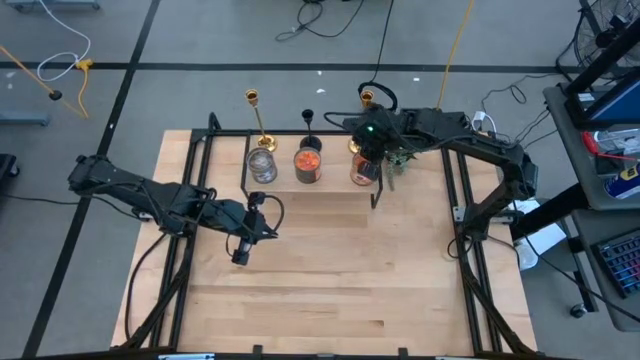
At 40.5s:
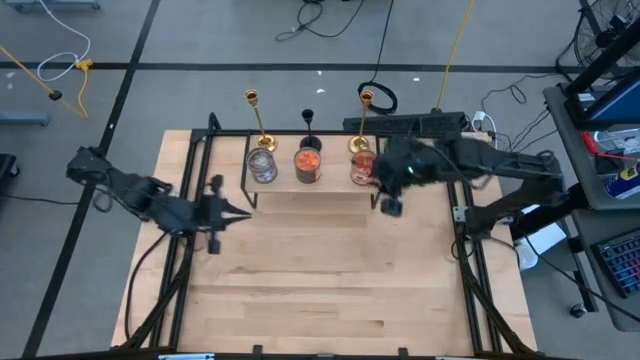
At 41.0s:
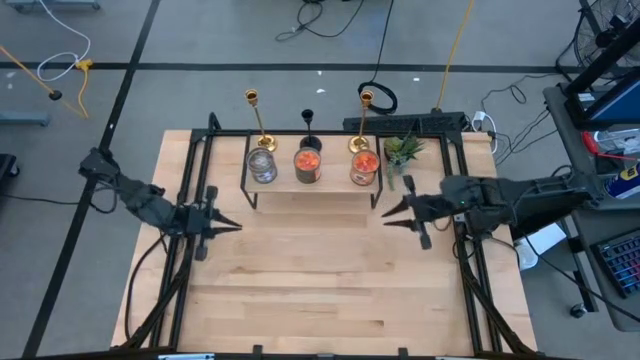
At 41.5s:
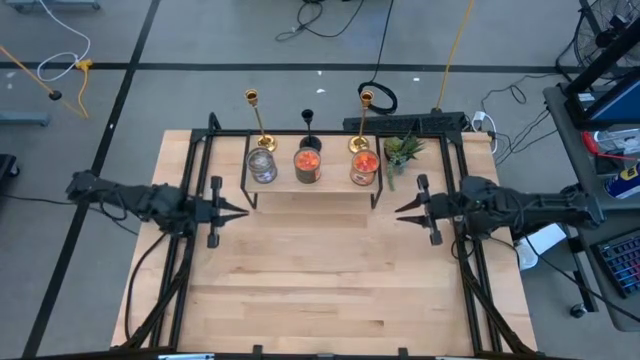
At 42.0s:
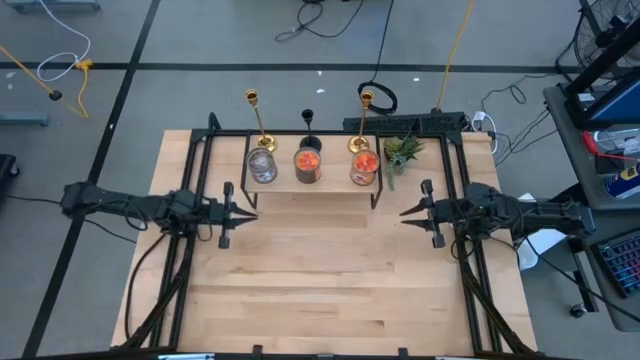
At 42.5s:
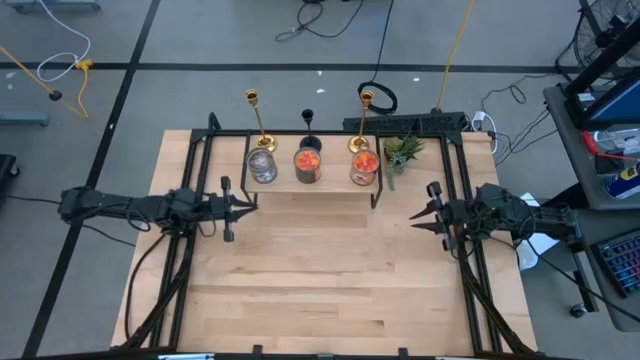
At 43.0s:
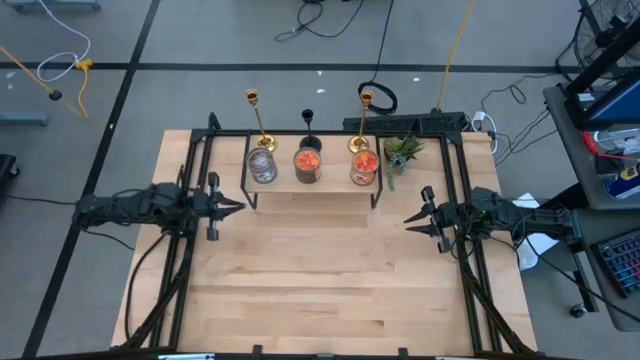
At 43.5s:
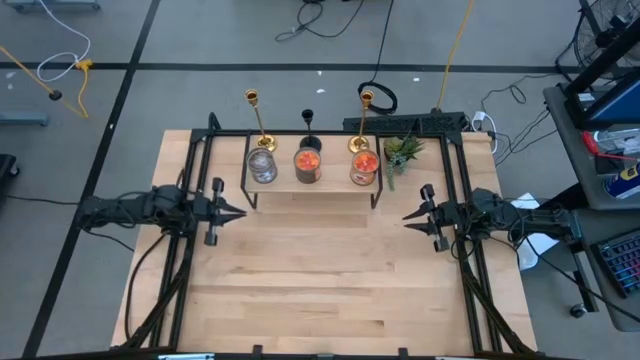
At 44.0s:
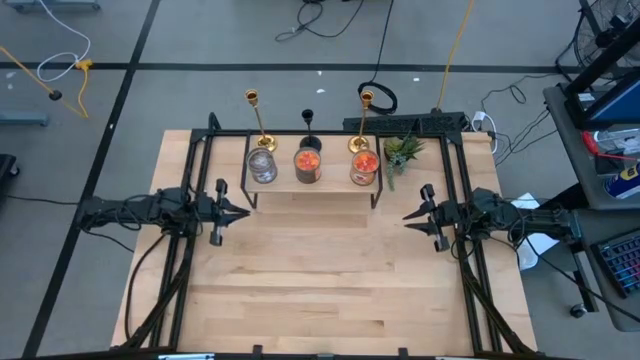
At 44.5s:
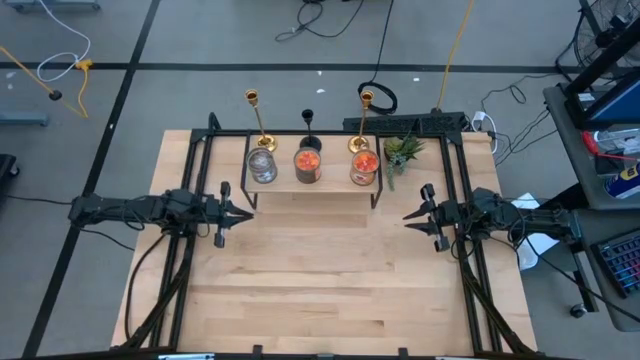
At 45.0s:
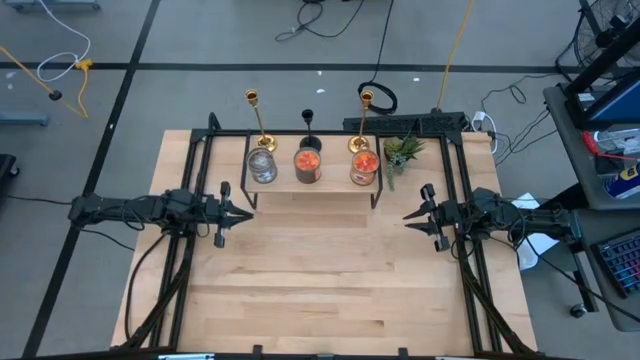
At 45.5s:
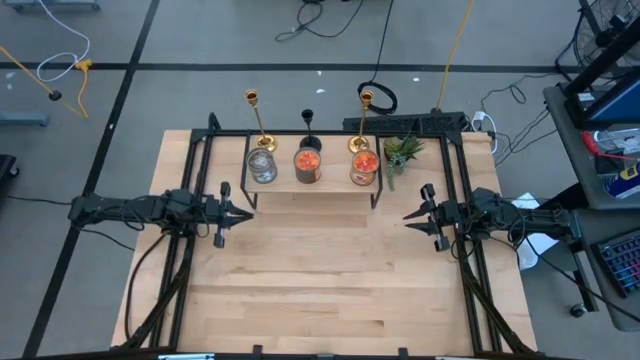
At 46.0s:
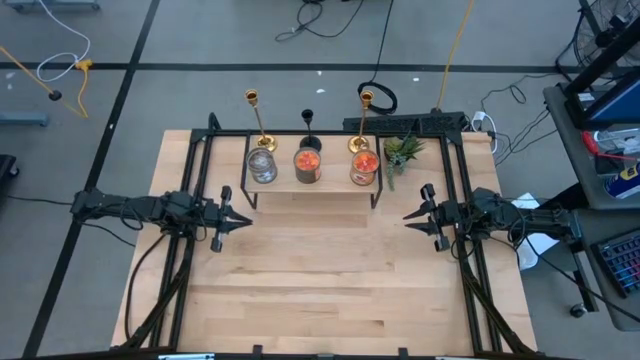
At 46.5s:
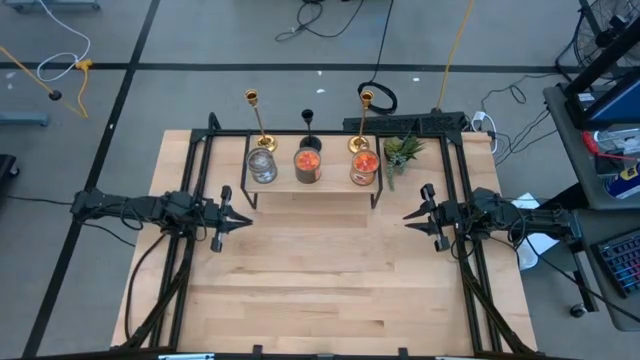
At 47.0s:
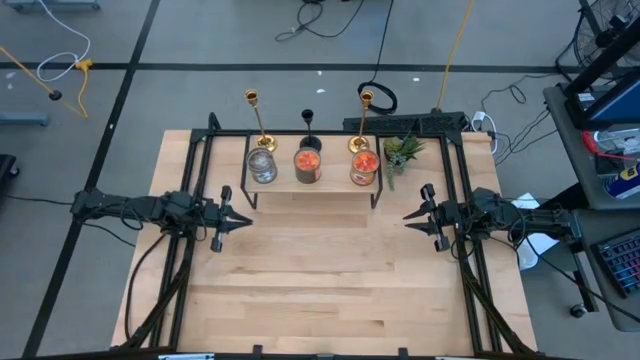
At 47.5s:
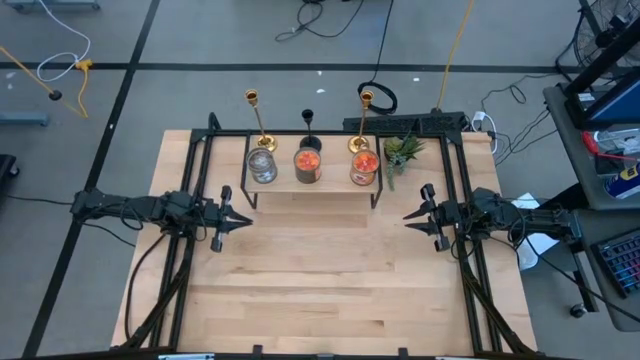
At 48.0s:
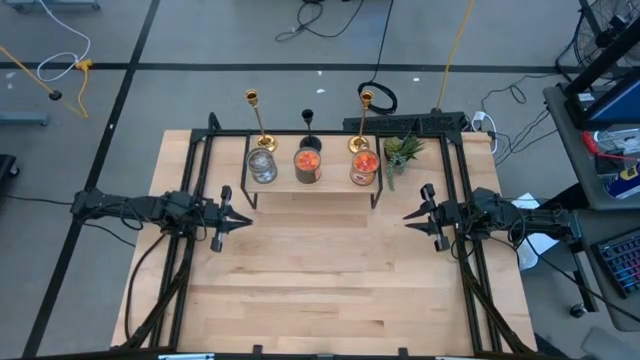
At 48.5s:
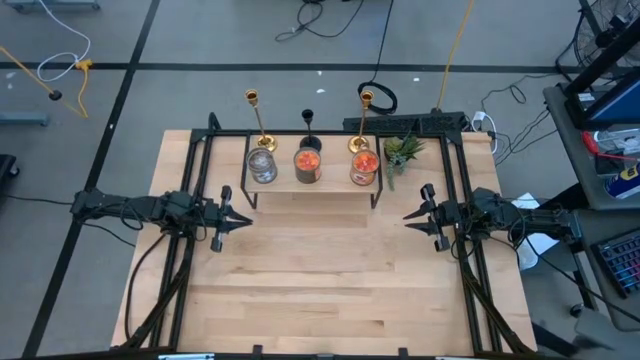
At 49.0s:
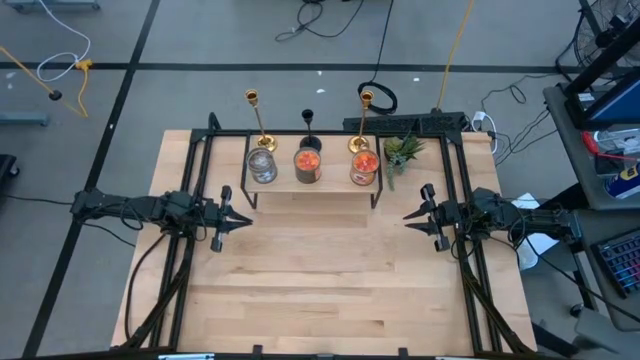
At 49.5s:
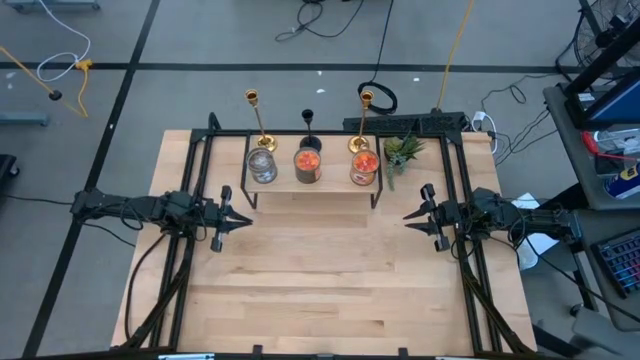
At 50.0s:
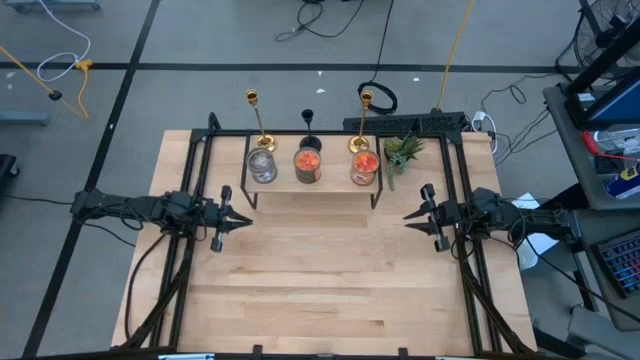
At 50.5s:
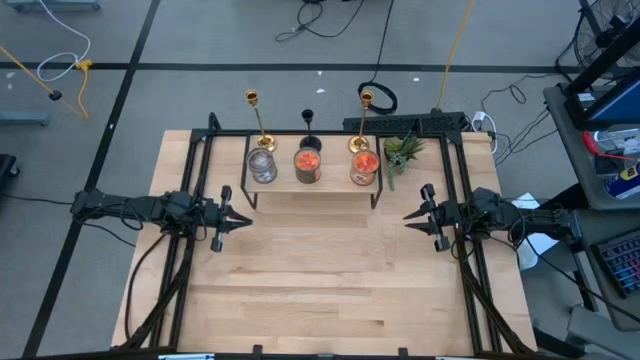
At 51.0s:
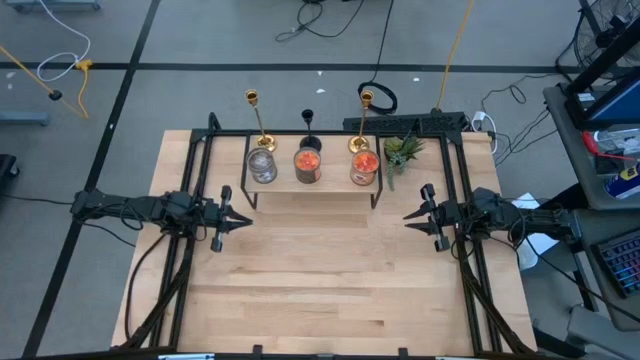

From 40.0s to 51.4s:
Task: Pick & Place candle stick holders
Return to Home Position

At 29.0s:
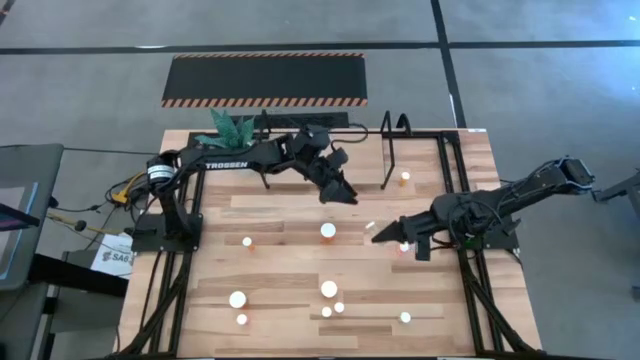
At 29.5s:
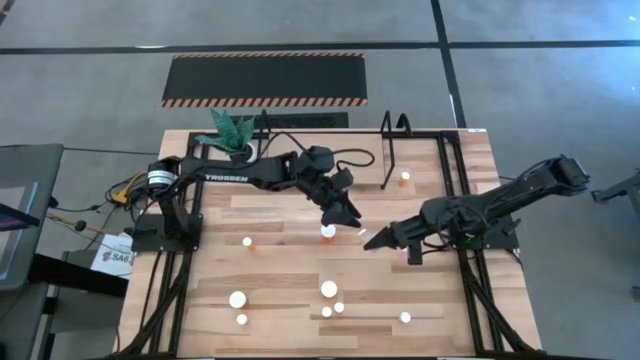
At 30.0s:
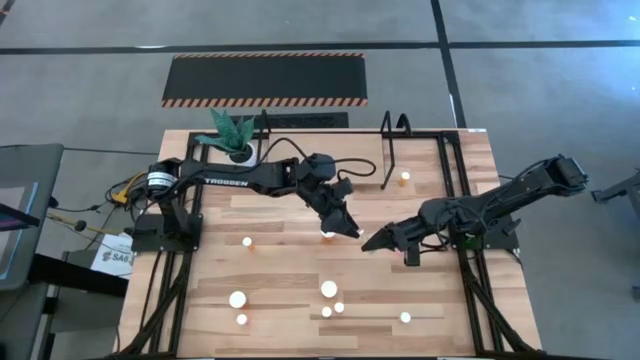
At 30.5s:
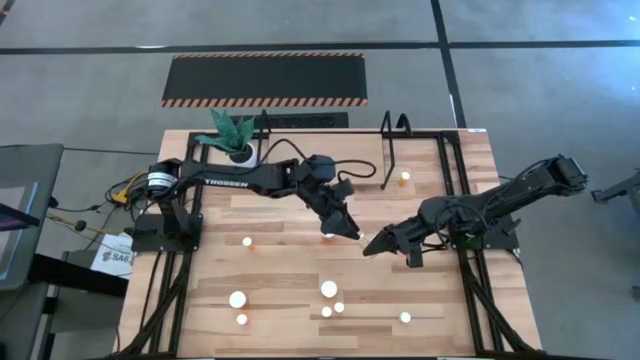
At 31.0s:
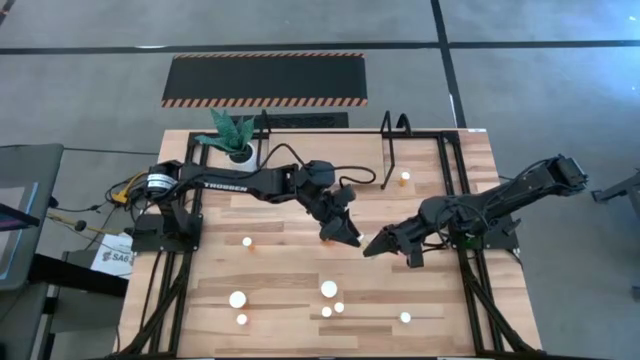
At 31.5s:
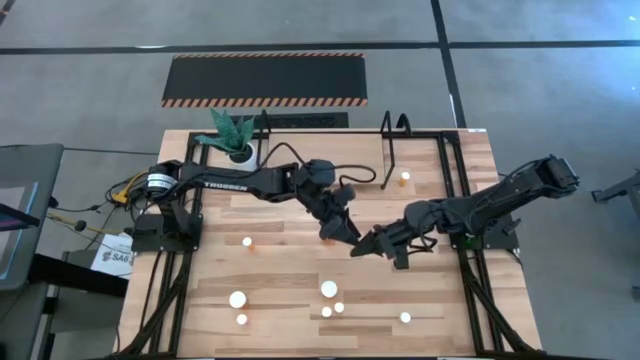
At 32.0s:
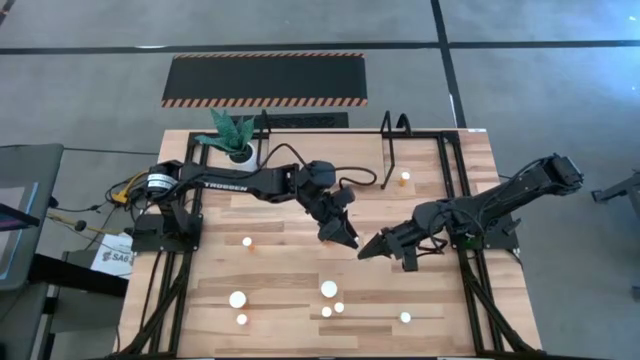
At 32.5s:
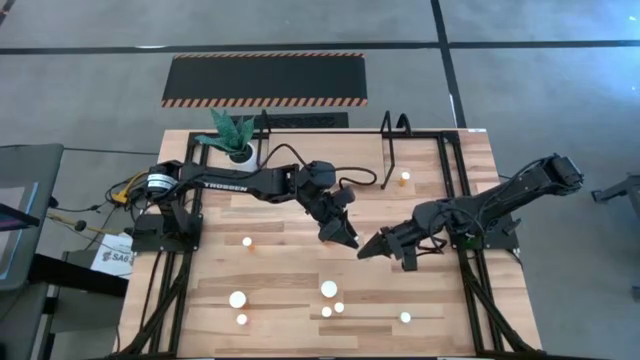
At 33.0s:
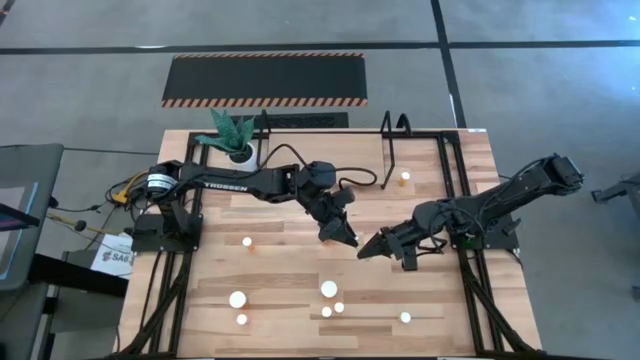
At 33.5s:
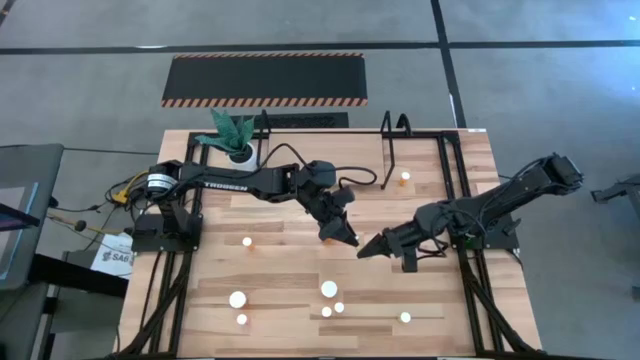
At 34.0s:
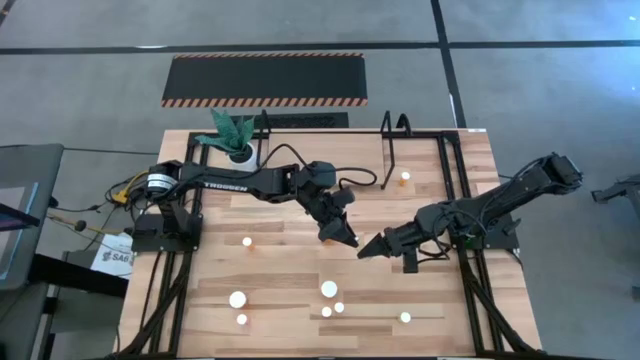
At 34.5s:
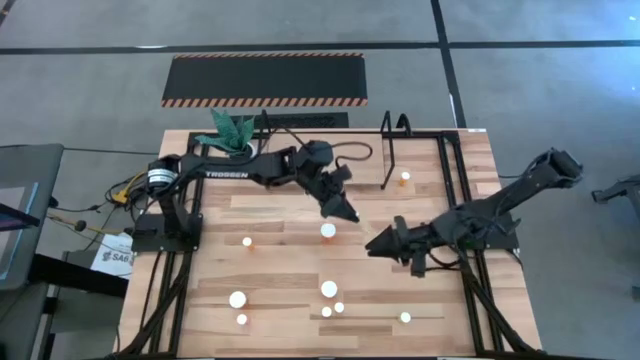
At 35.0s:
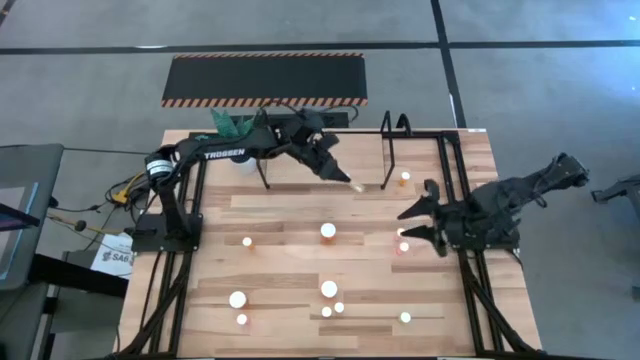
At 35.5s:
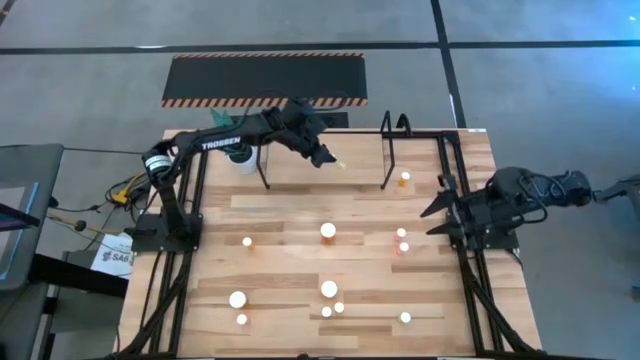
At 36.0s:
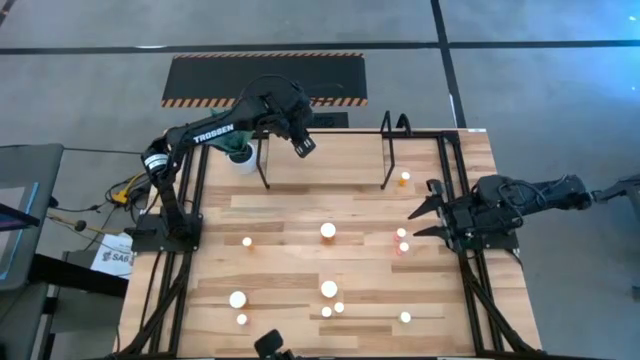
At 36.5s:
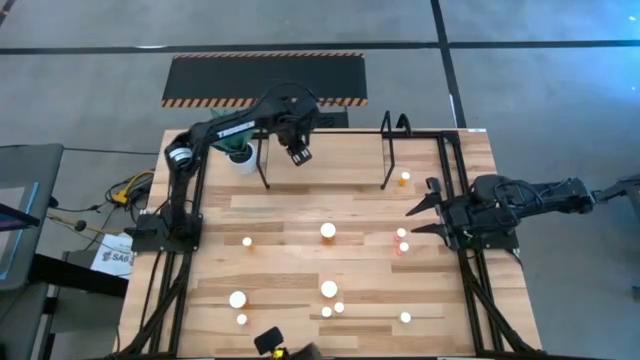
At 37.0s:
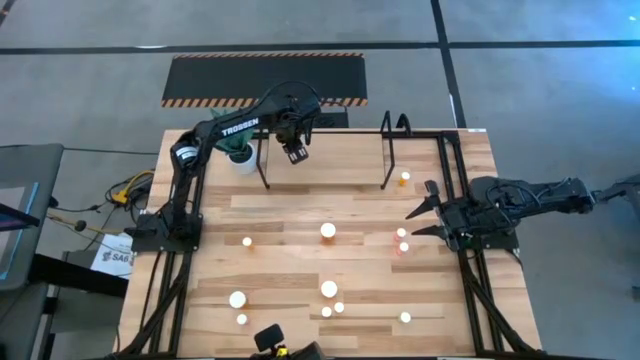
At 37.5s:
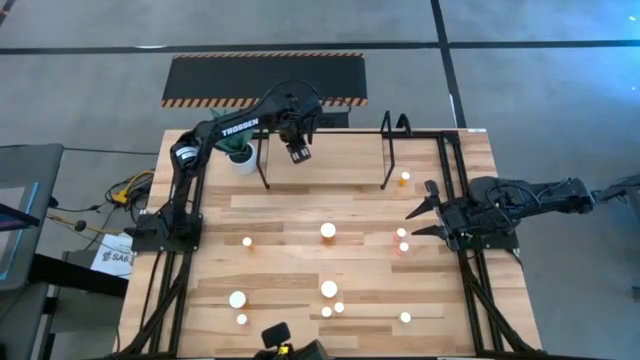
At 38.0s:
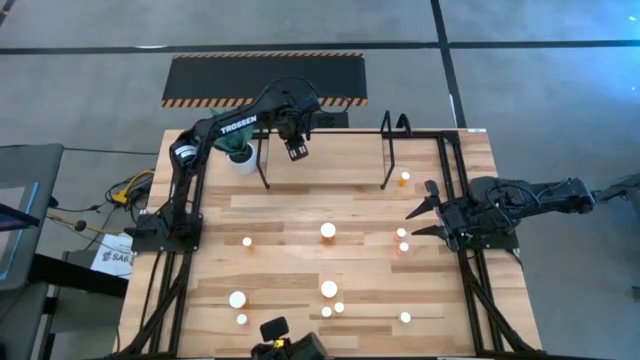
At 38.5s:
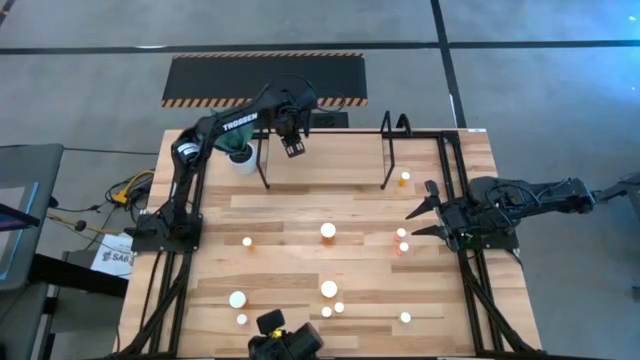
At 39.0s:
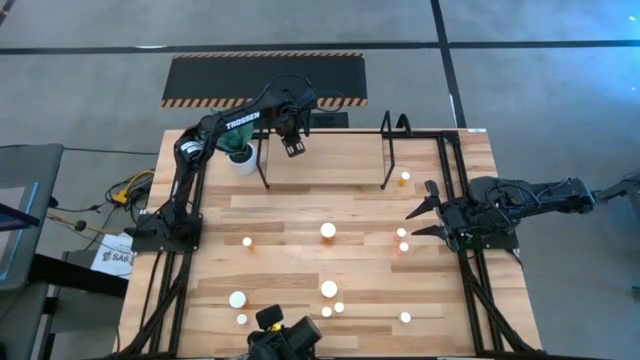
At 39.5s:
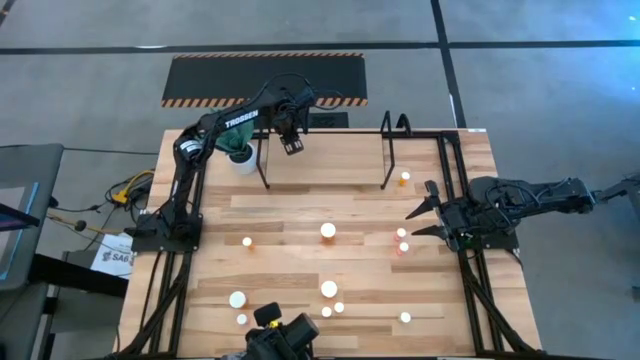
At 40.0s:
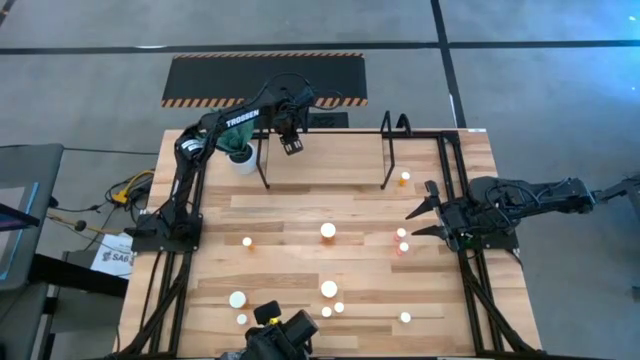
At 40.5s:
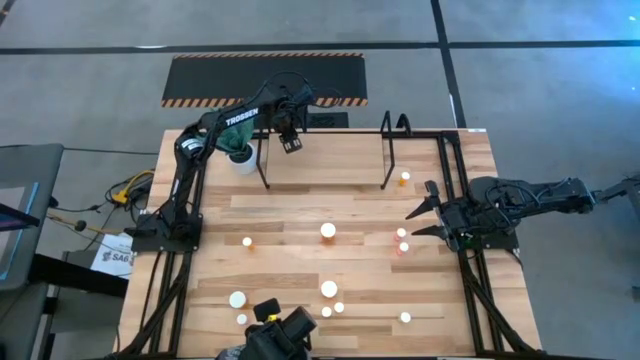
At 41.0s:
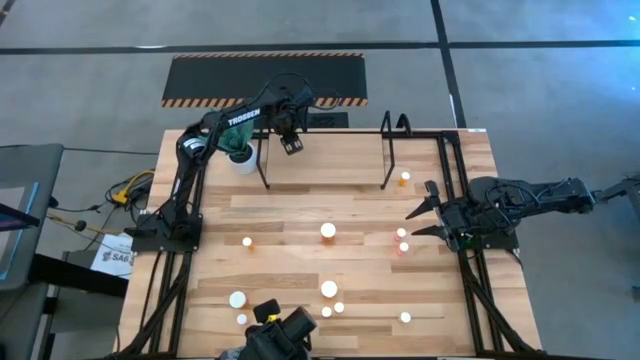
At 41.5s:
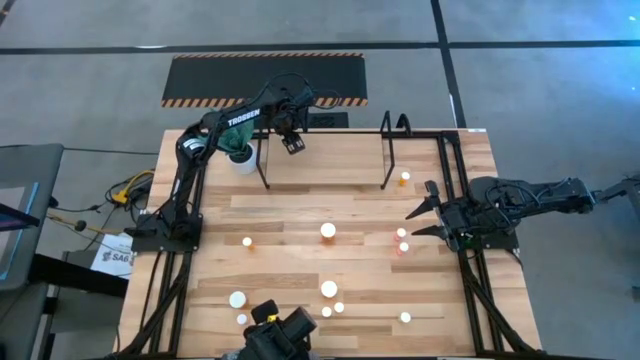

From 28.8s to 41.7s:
Task: Pick and place medicine bottles onto shelf by color
Put the top left yellow pill bottle on the shelf
